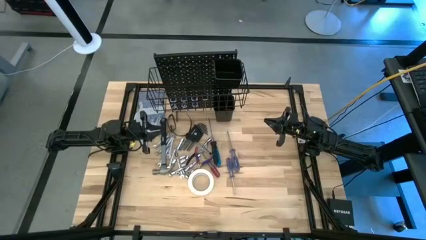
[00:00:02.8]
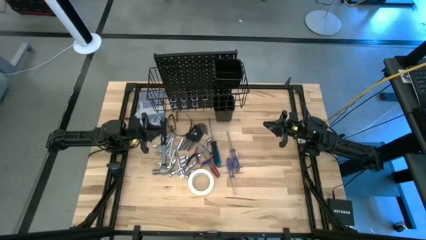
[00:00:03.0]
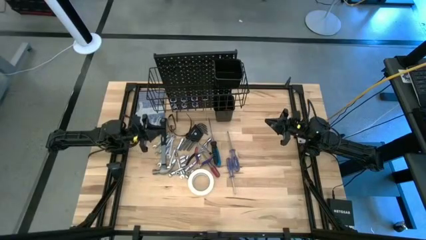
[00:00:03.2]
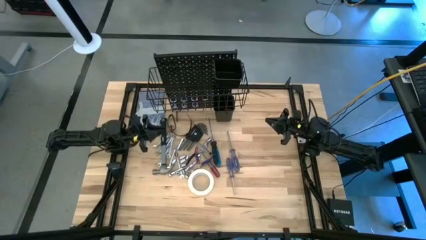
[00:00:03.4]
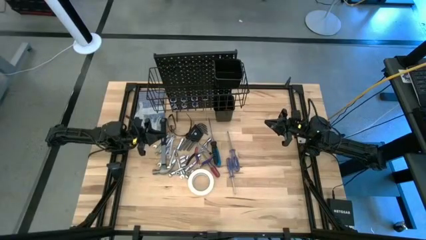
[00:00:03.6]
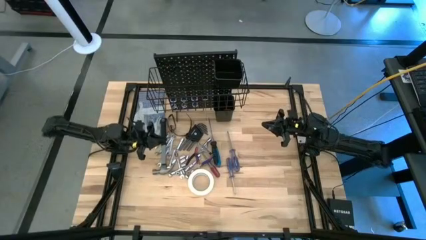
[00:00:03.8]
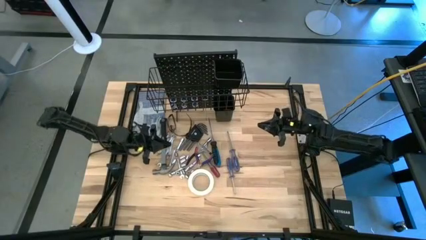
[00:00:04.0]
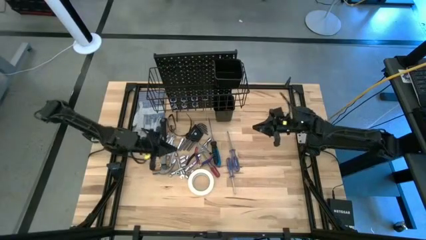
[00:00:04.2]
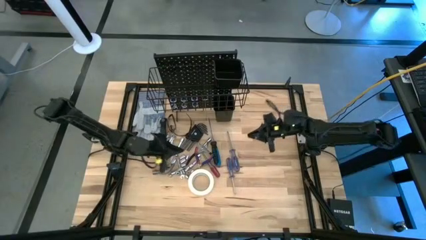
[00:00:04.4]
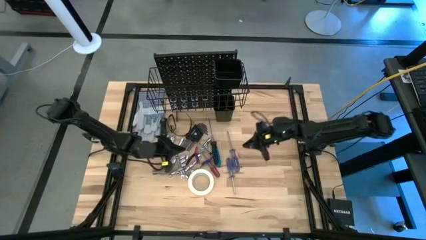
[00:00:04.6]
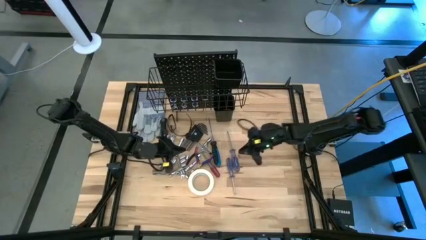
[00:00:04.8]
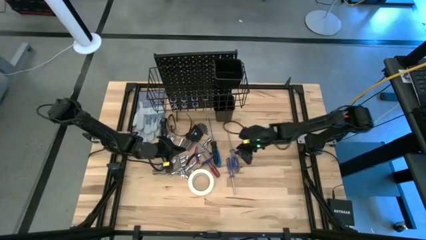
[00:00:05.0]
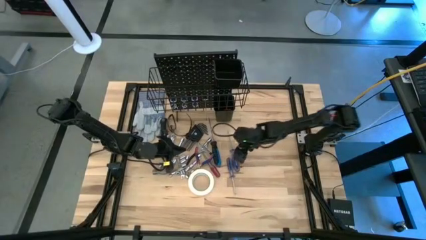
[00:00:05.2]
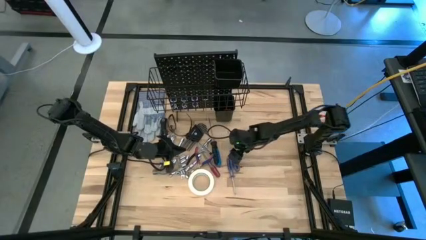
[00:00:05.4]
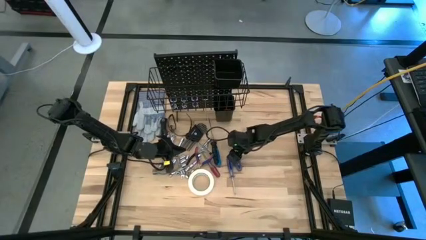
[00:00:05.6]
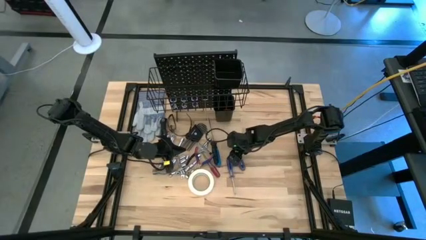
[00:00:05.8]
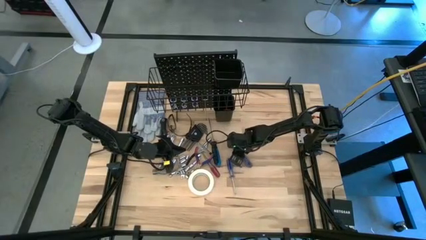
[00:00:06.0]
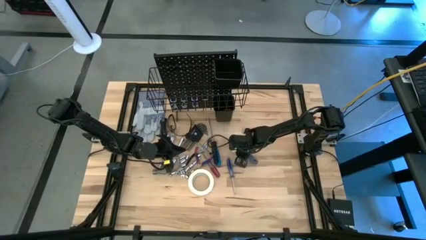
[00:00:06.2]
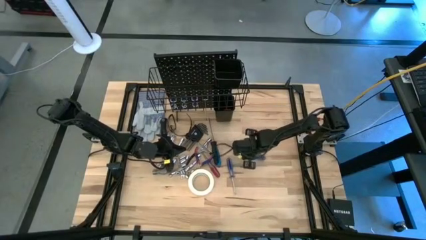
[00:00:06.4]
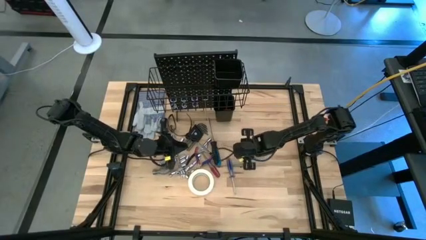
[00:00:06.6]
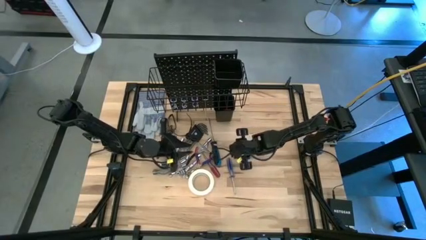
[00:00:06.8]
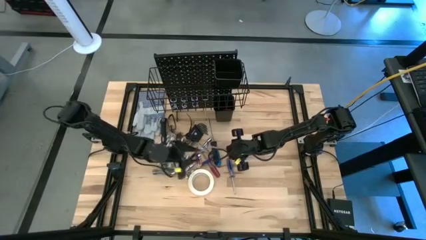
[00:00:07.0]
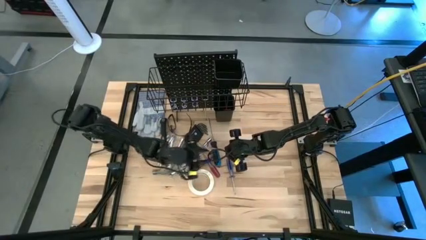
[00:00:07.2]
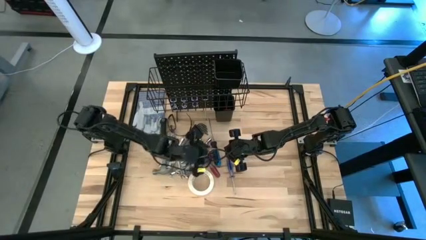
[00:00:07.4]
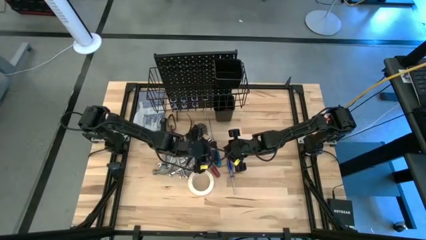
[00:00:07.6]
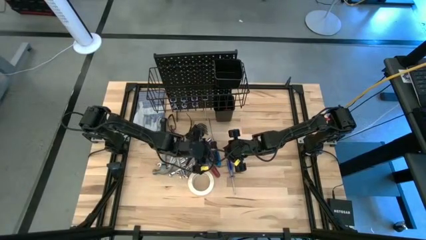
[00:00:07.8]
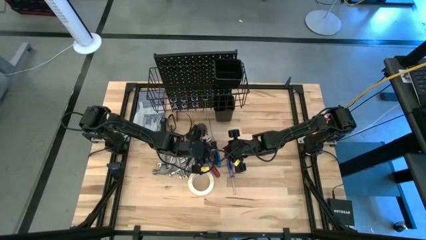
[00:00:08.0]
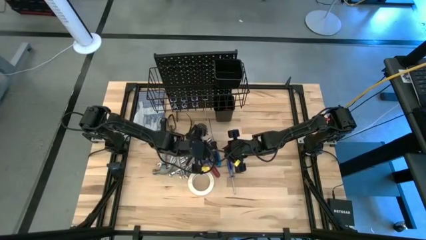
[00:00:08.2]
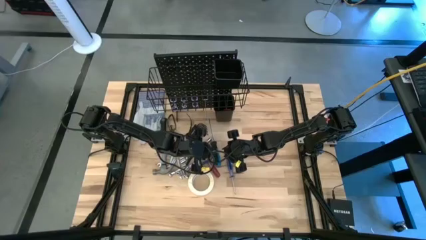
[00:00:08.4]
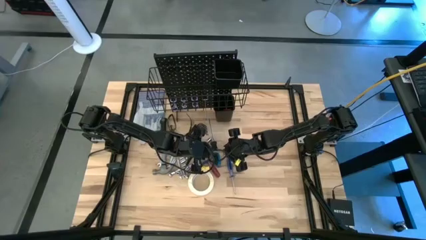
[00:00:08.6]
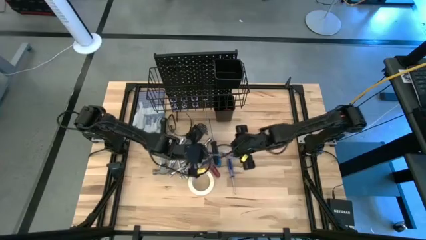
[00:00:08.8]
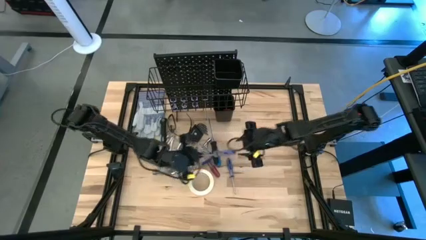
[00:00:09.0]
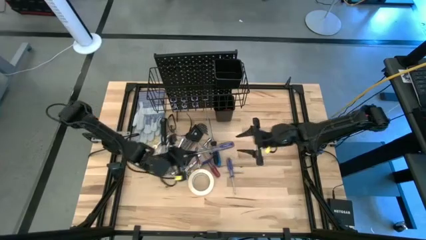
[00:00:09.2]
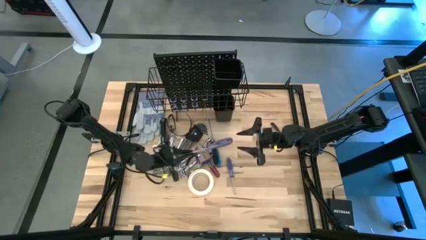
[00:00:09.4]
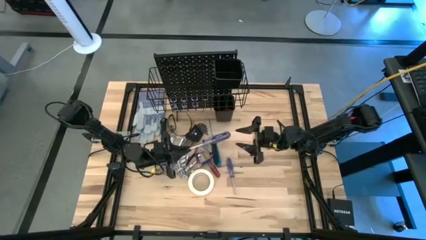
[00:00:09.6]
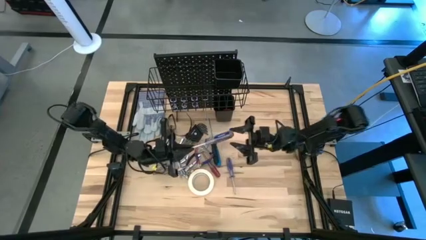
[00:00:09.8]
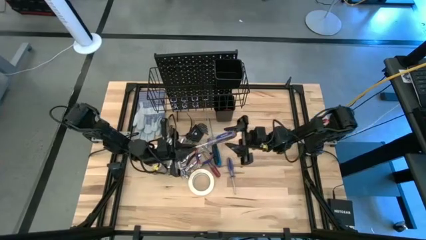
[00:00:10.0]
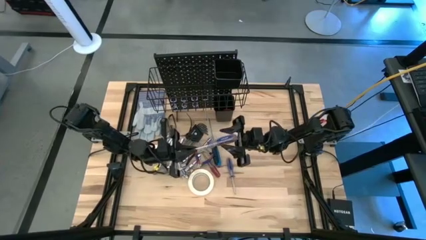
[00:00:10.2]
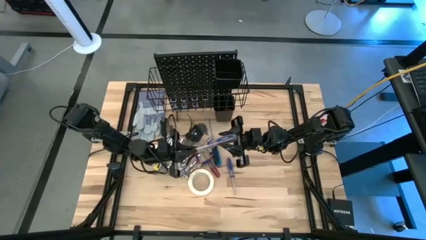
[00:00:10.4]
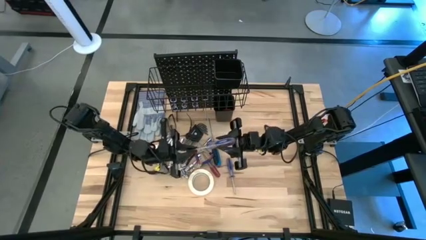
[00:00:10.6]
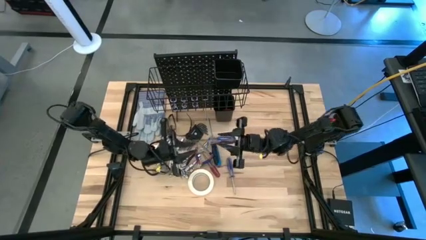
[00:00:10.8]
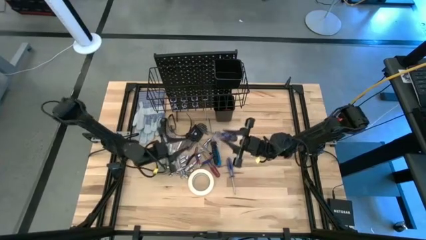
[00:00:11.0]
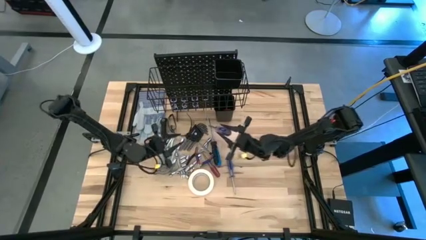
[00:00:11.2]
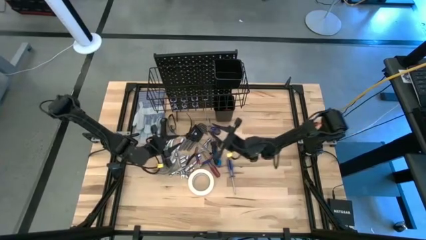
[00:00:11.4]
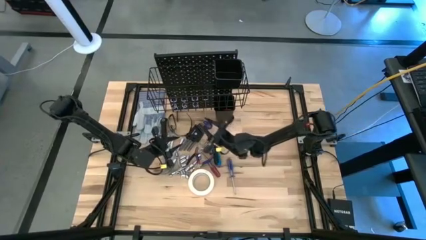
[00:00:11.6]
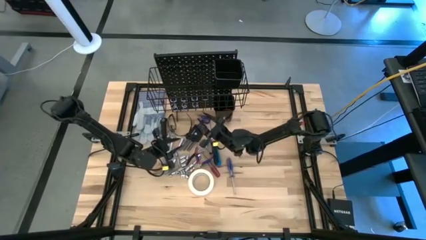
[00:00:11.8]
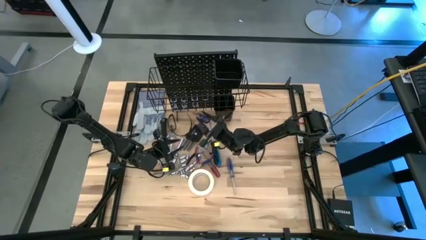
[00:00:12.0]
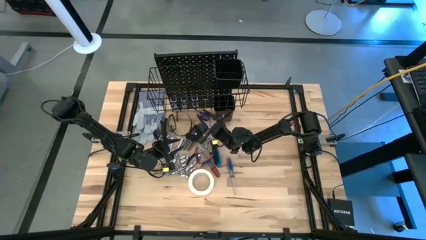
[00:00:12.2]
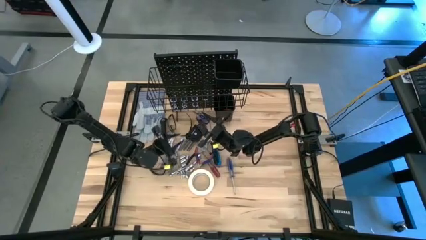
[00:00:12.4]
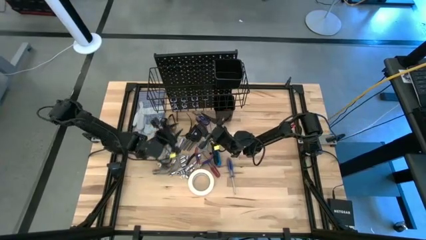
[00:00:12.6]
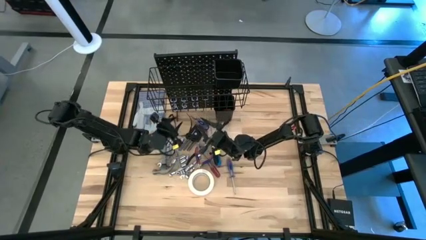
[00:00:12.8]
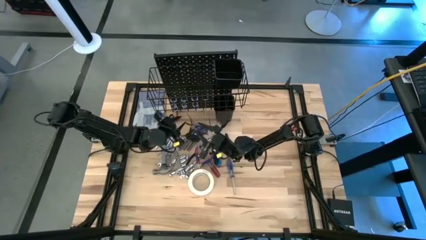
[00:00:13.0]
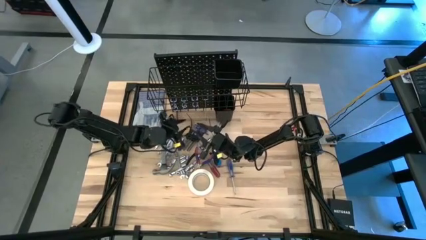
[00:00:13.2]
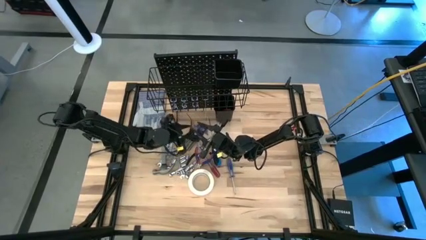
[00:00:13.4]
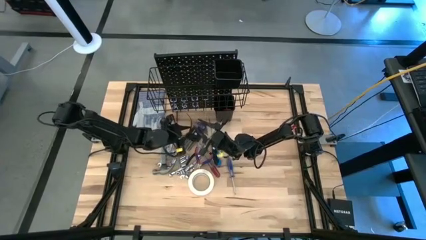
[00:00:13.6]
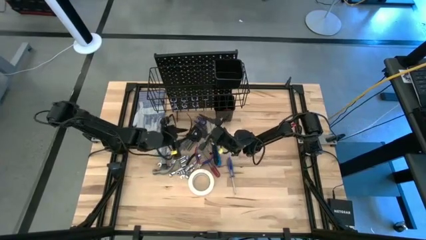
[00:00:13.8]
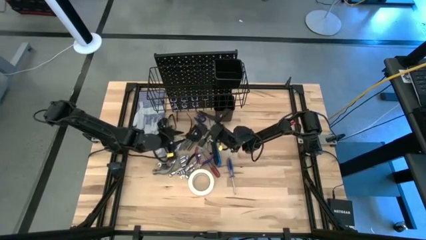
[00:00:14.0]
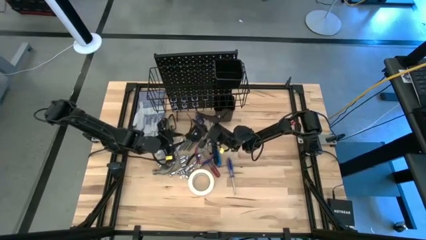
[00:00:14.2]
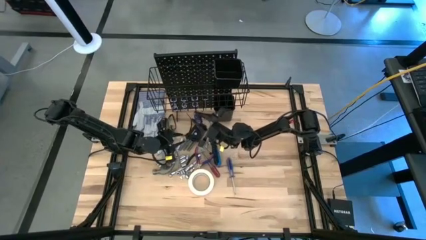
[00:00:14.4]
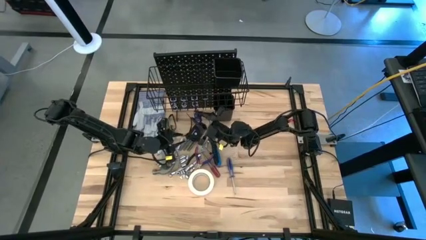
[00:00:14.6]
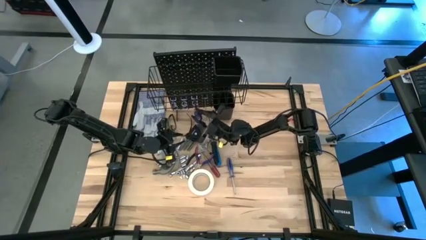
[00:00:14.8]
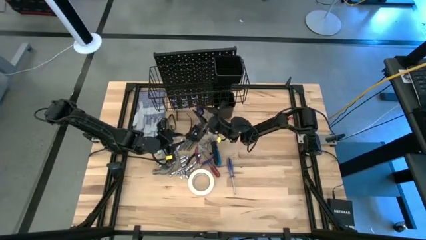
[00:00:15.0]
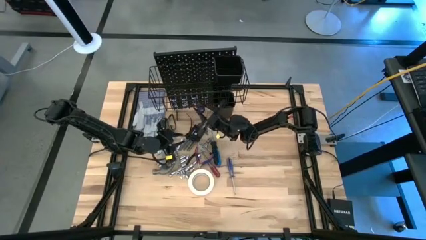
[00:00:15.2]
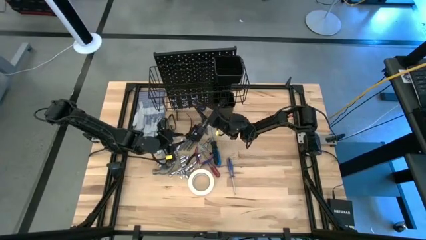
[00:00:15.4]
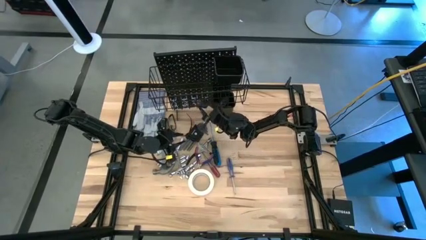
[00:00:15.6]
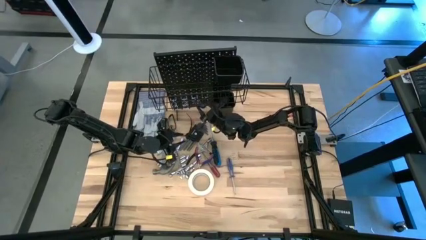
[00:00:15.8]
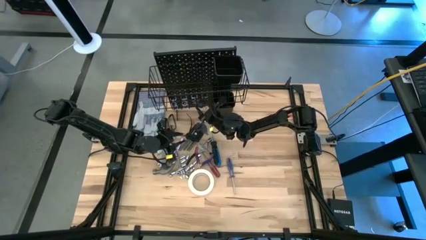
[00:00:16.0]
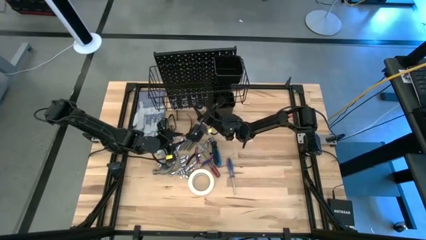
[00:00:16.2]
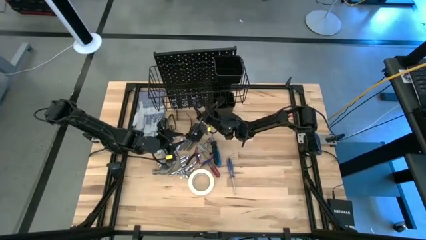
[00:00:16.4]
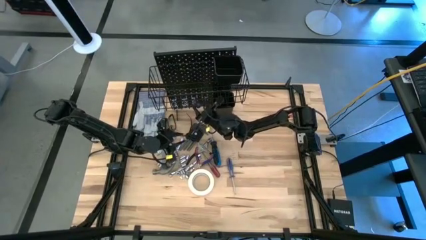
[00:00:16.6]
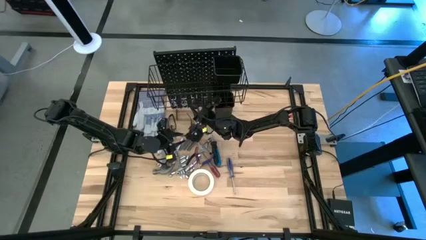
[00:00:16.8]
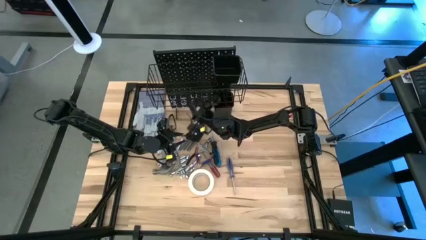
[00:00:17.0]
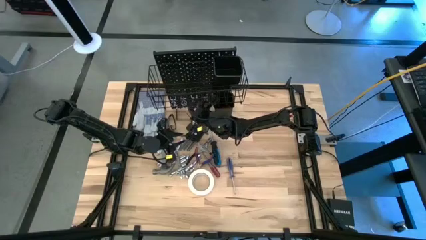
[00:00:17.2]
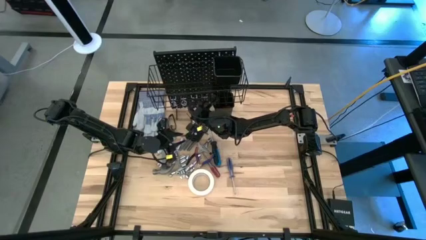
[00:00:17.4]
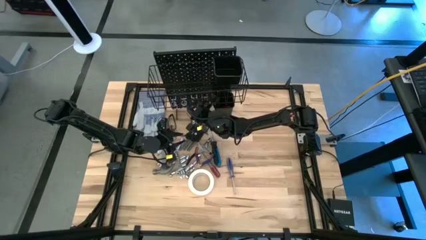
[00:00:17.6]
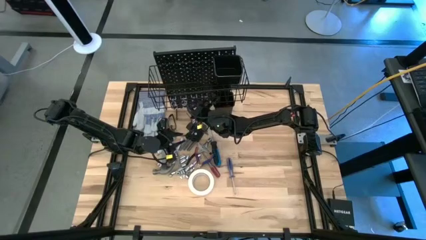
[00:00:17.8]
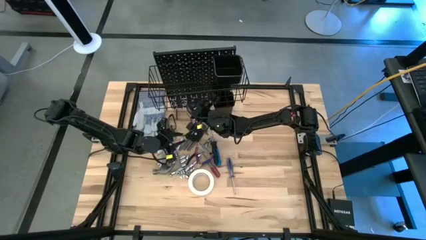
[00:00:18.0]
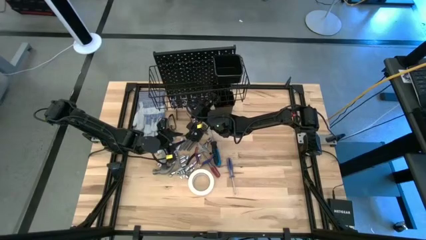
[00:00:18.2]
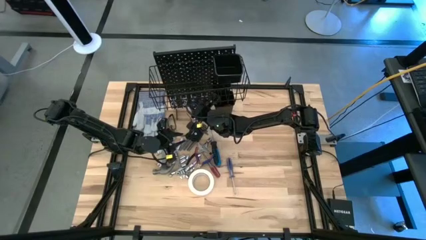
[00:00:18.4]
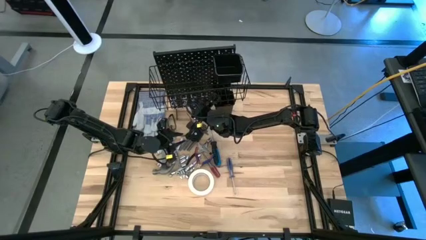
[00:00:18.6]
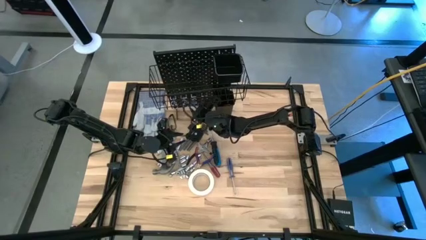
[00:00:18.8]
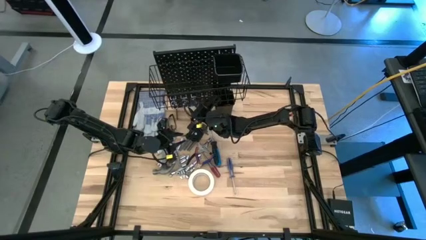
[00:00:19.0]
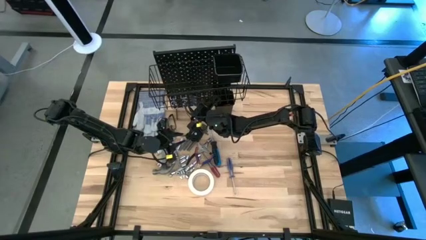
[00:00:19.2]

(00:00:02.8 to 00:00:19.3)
Task: Hang tools onto peg board
Hang the blue screwdriver on the pegboard
